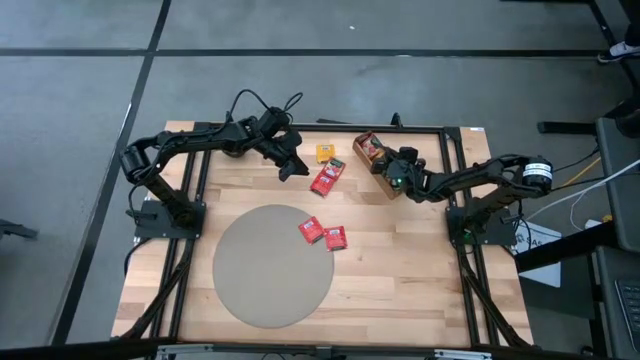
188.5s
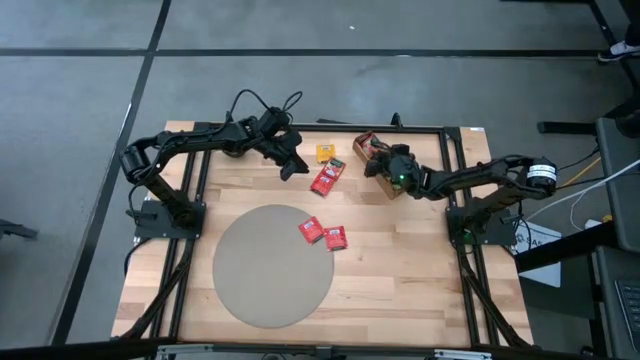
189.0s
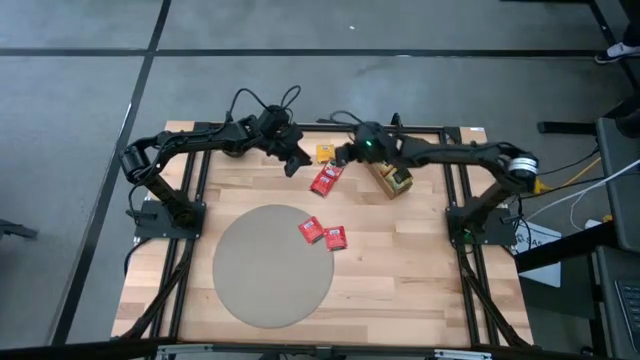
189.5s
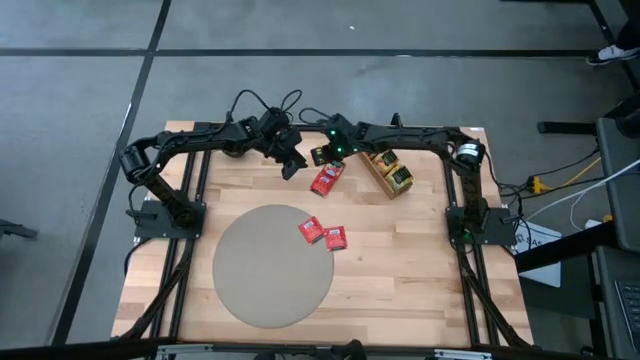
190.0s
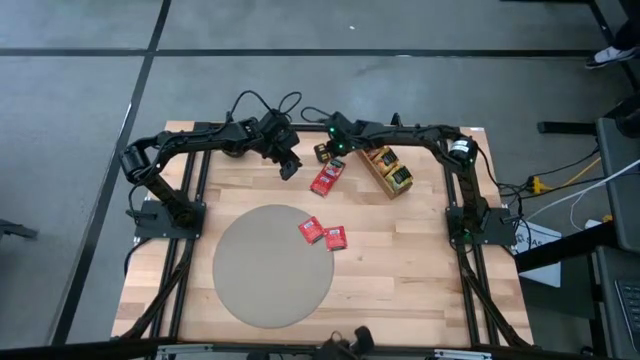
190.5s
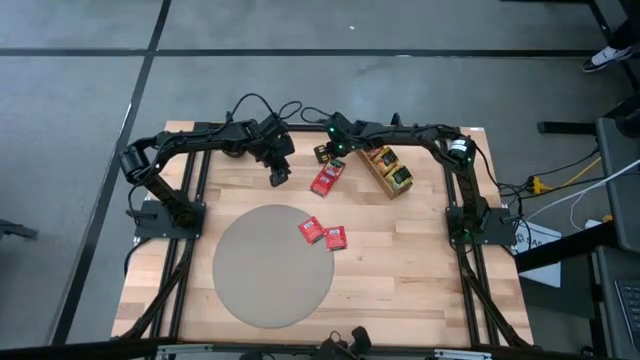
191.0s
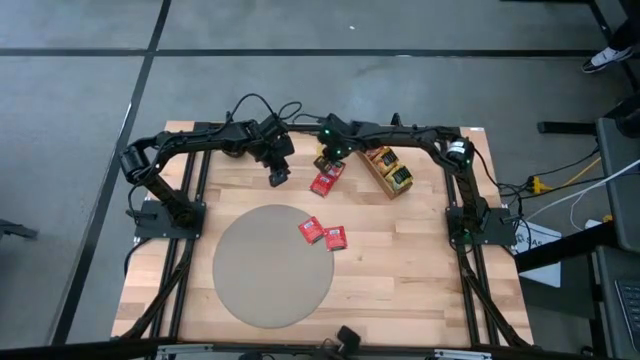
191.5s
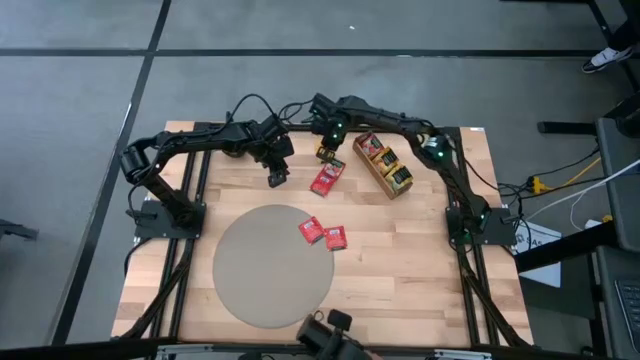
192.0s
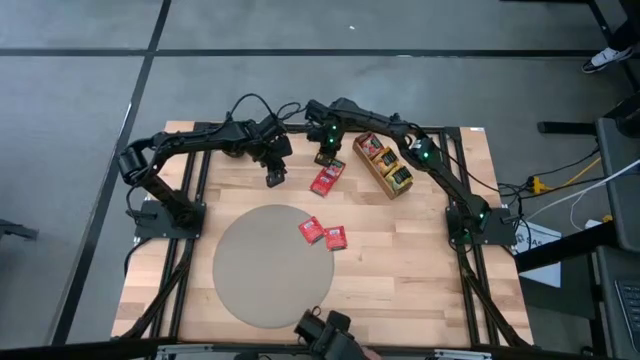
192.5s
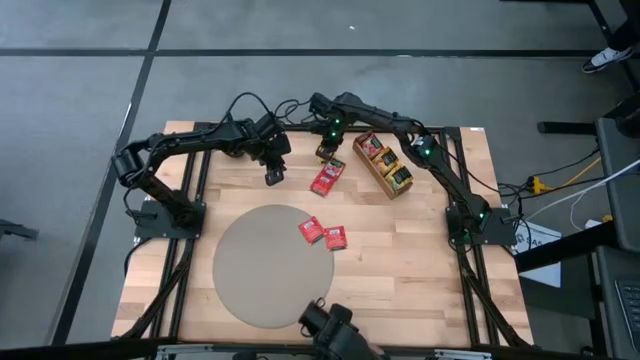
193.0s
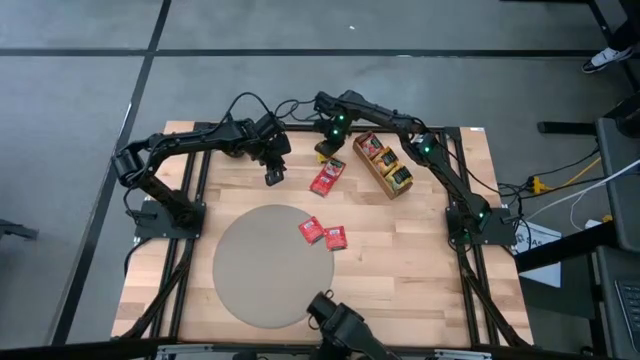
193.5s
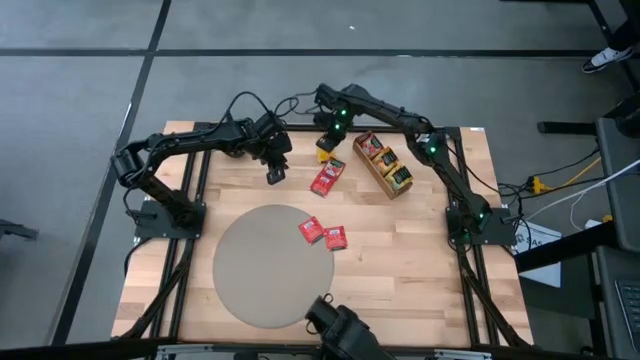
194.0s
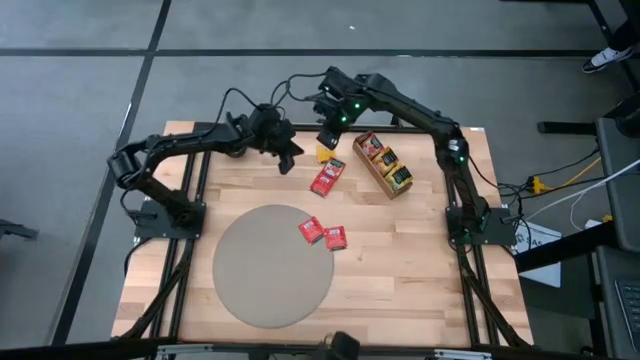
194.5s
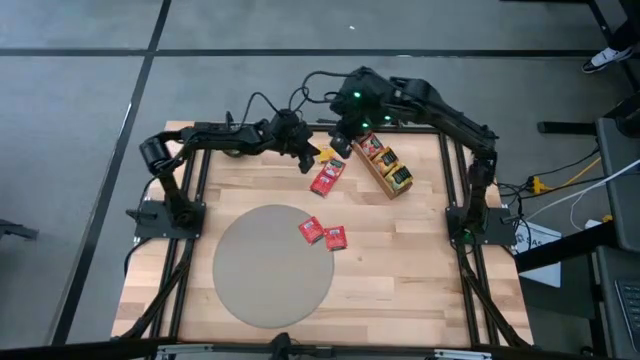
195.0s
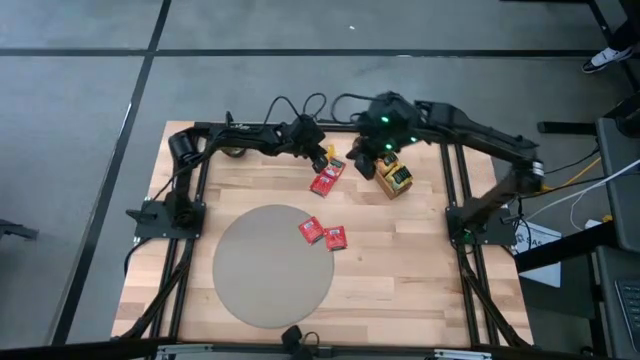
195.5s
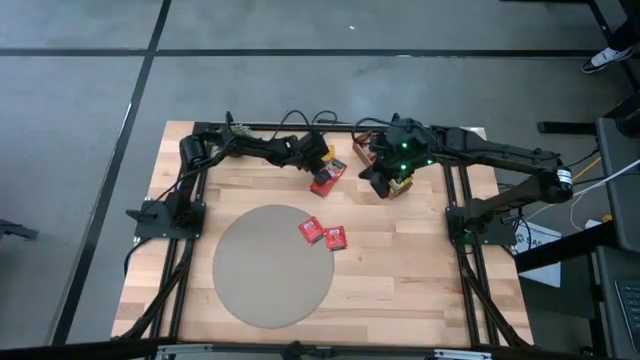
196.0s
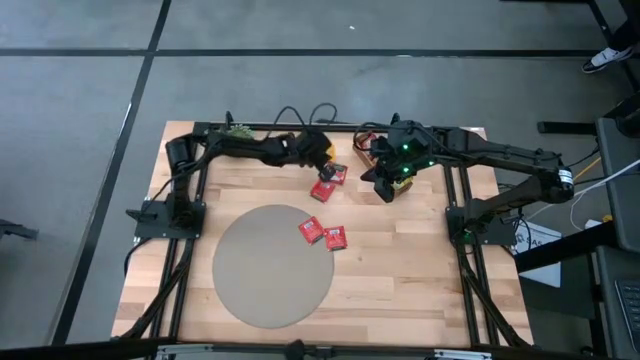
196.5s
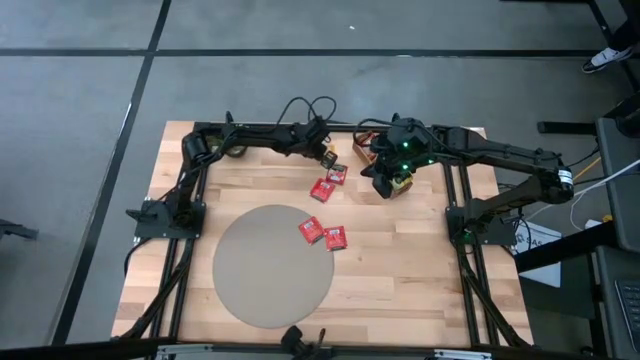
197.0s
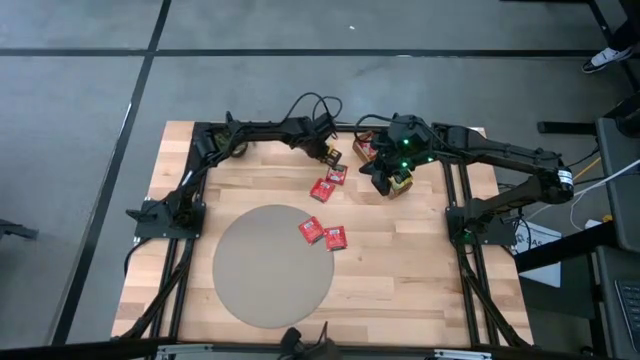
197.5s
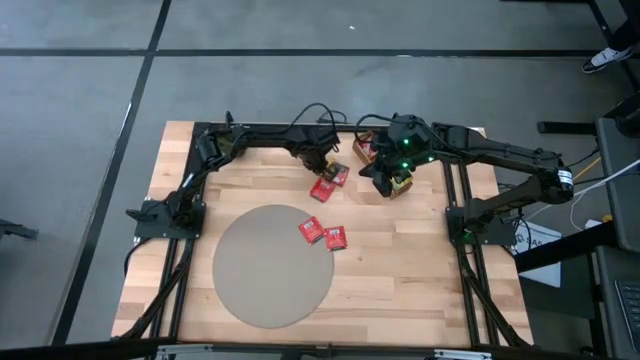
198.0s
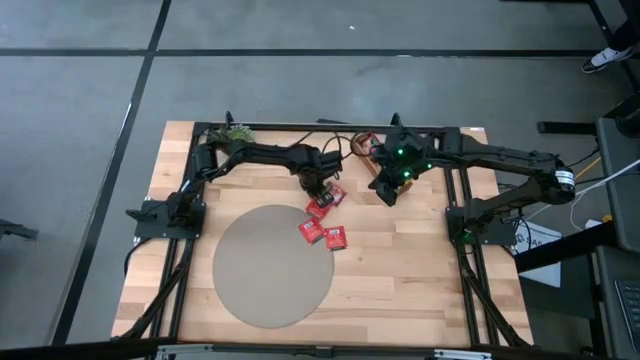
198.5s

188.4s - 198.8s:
Task: Pick & Place Tea
Move the tea bags to the center of the table

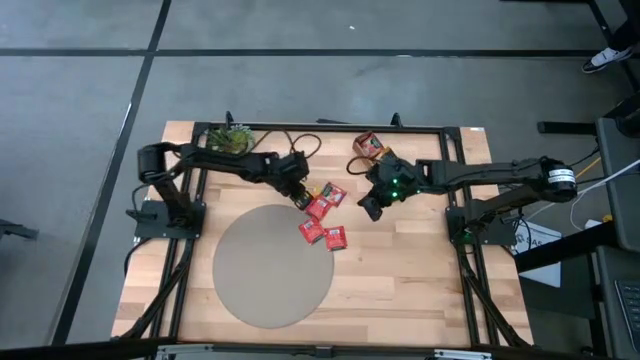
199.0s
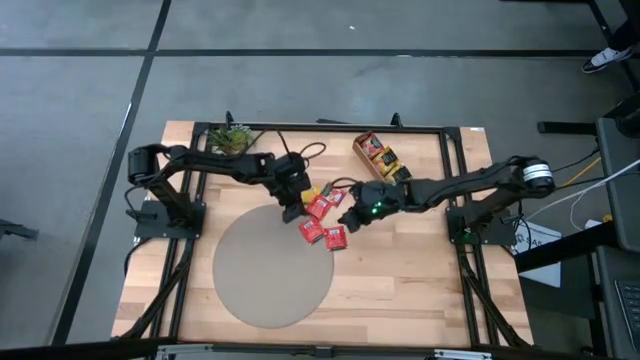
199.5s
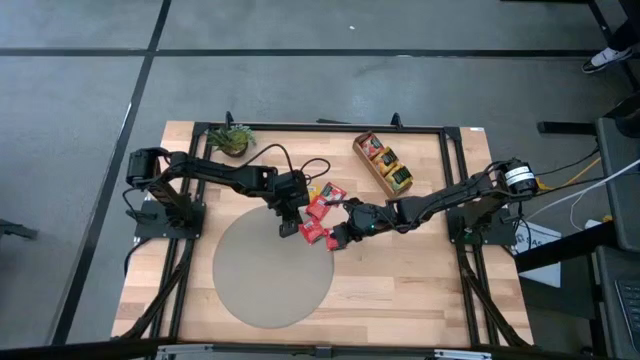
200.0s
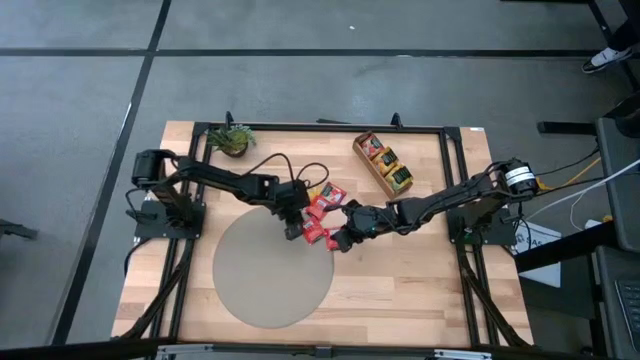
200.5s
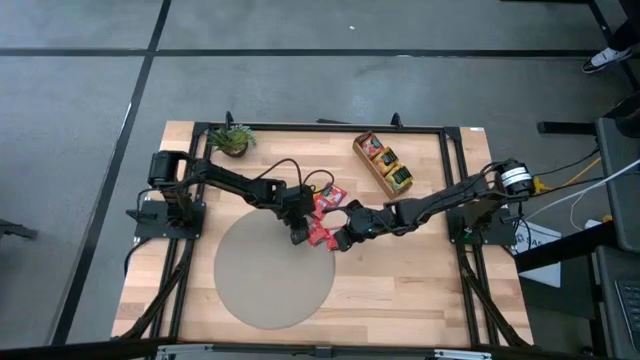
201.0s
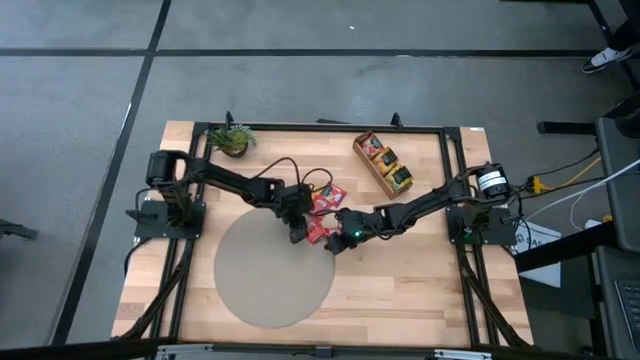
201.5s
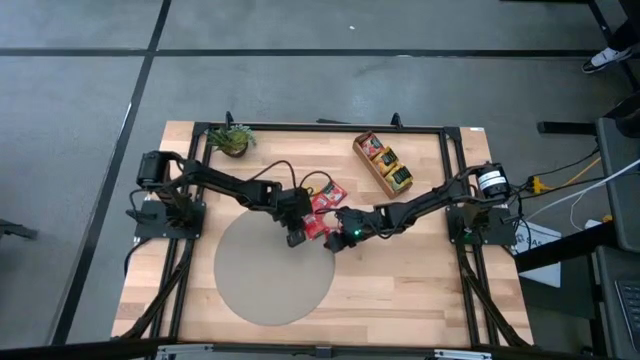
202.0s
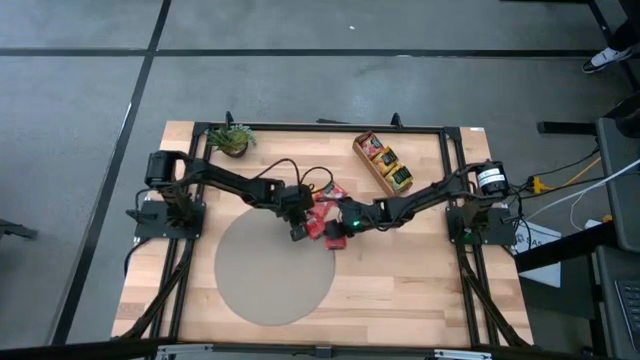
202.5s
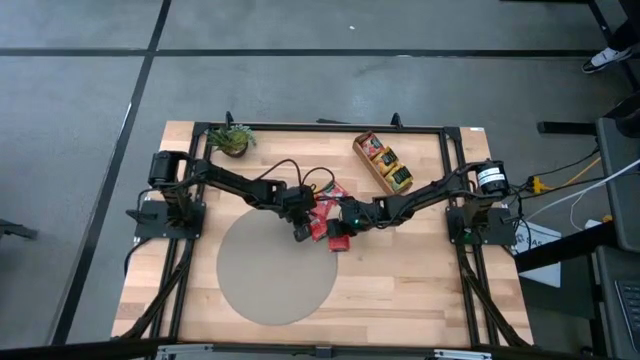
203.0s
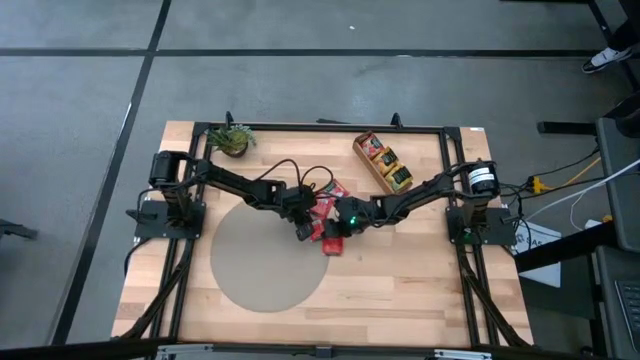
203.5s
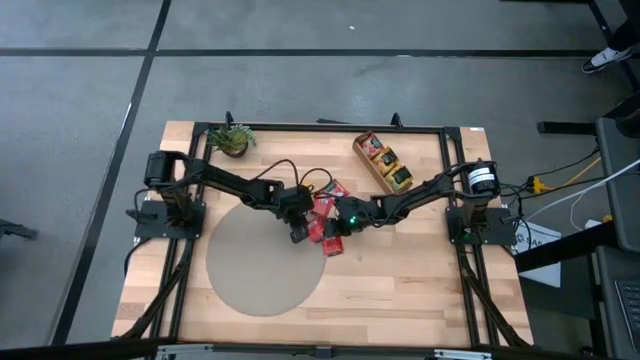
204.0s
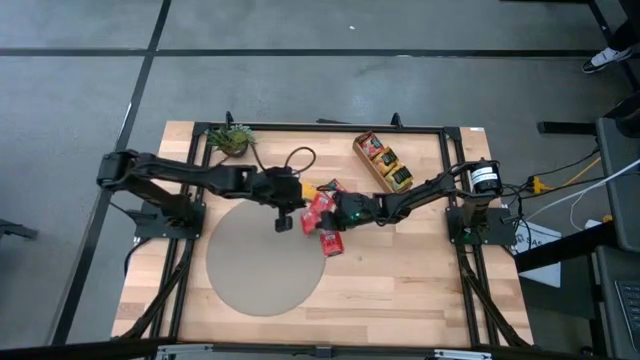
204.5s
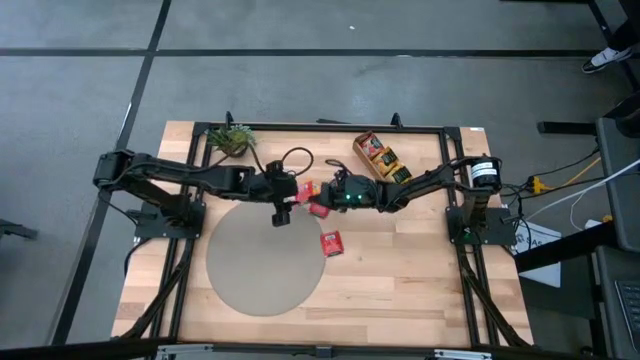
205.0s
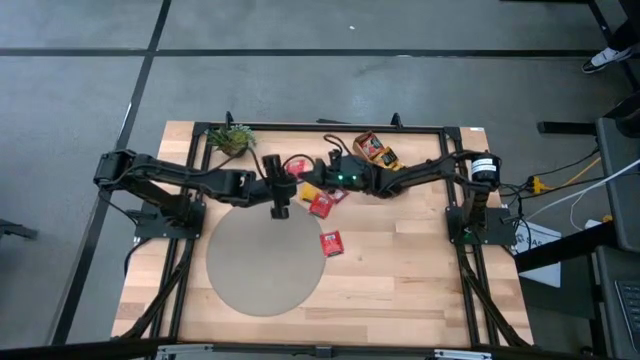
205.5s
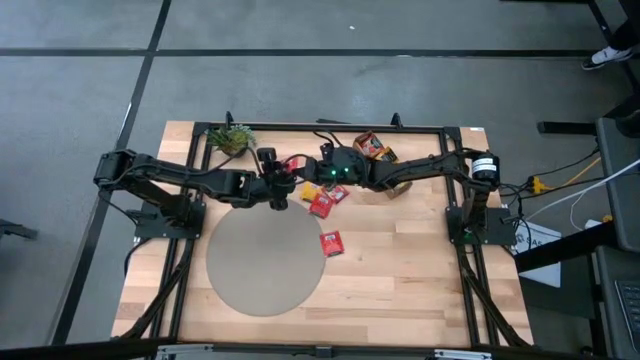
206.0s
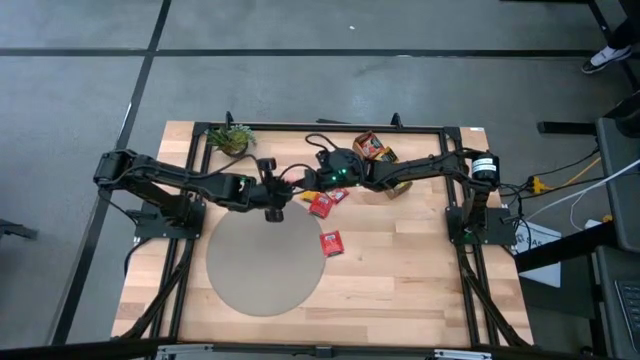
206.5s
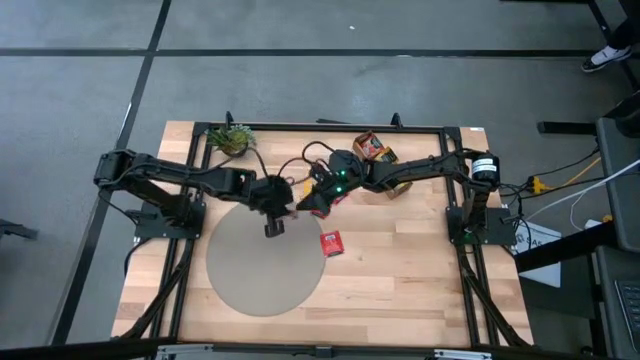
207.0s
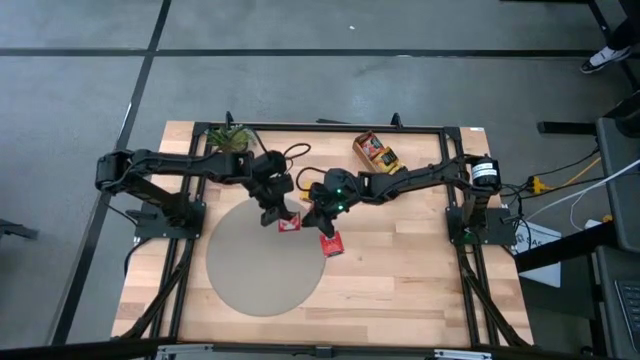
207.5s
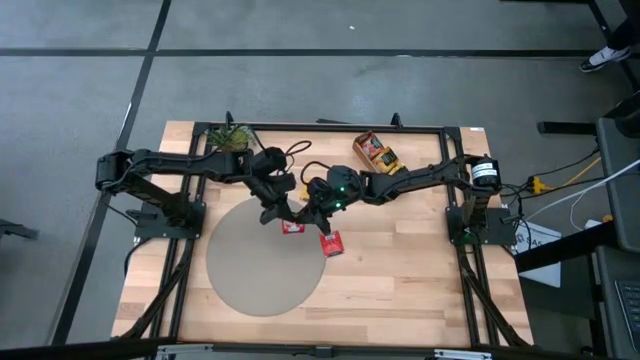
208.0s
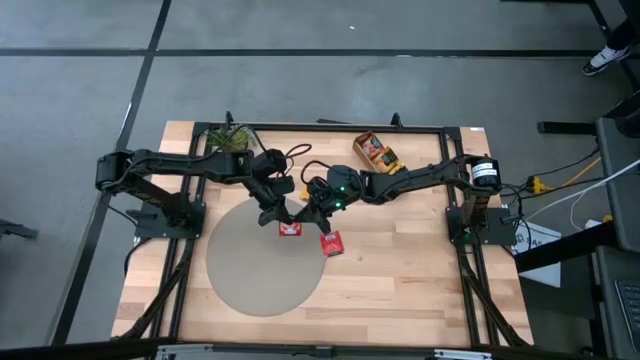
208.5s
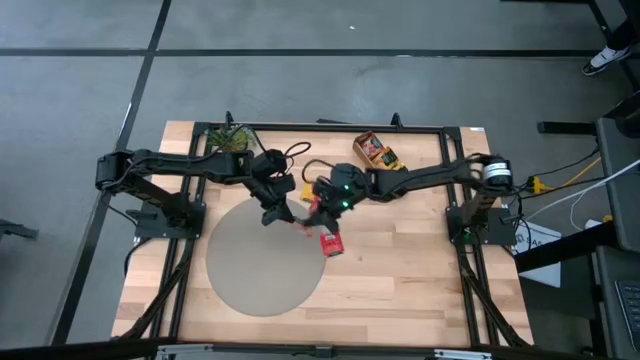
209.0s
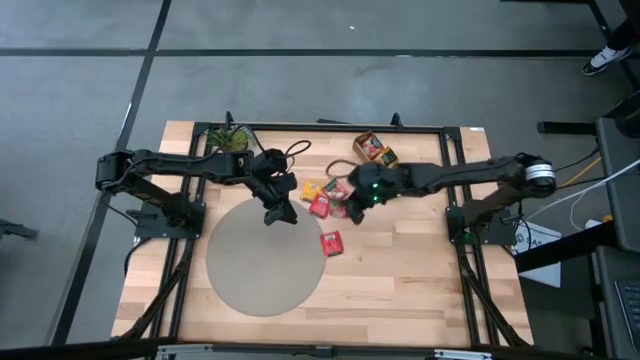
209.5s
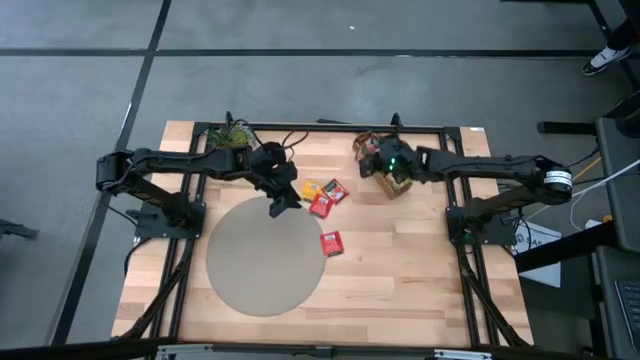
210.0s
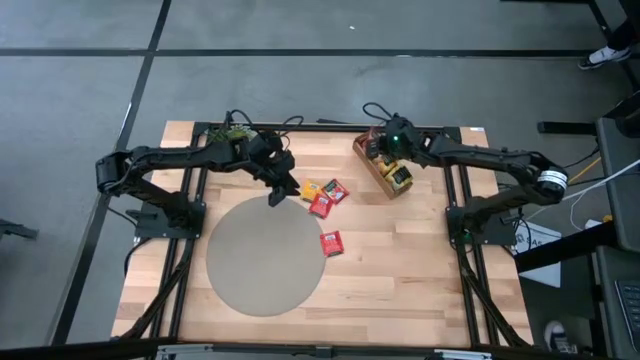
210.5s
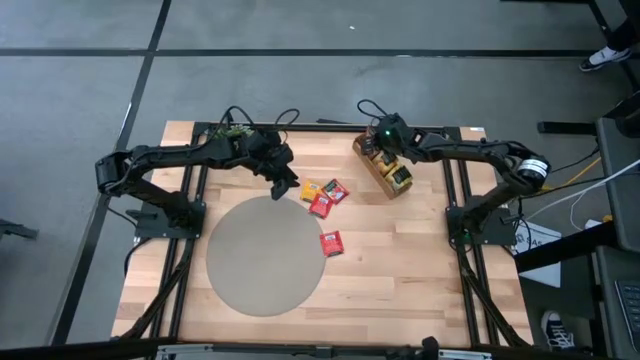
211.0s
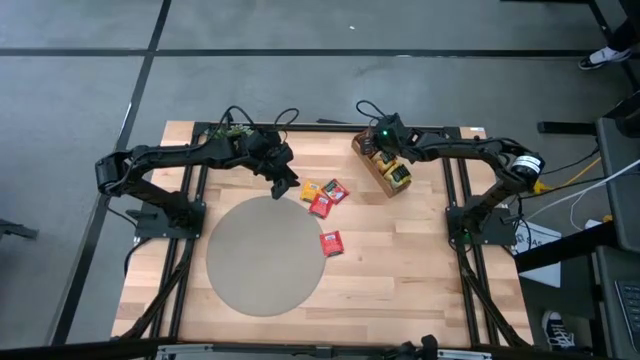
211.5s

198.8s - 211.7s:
Put the red tea bag into the top section of the wooden organizer
